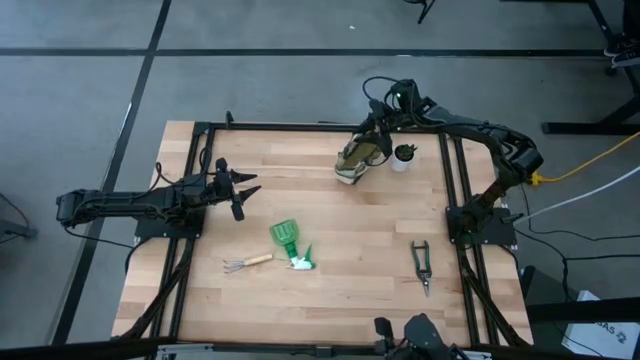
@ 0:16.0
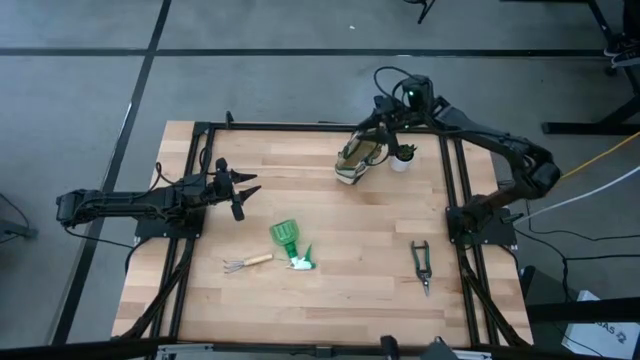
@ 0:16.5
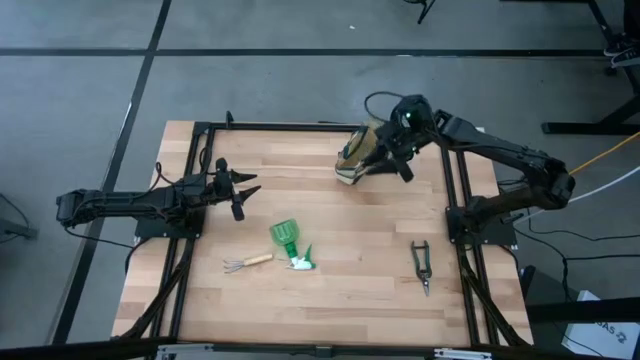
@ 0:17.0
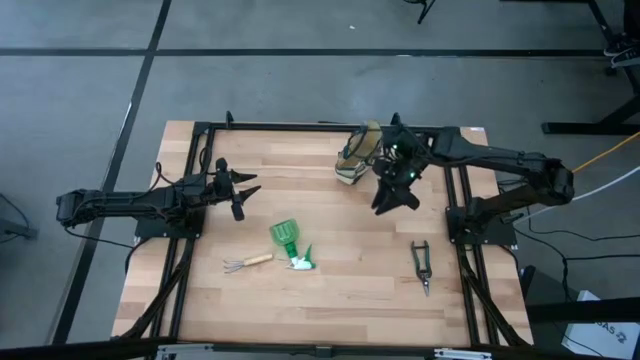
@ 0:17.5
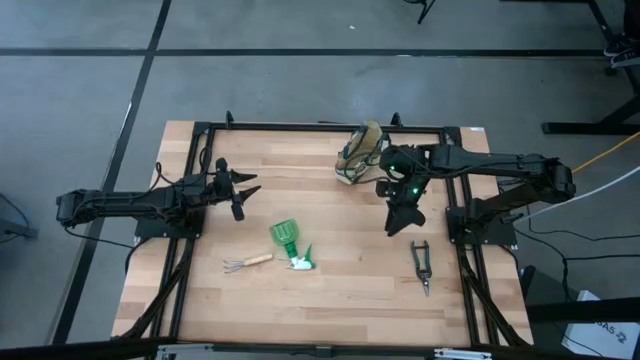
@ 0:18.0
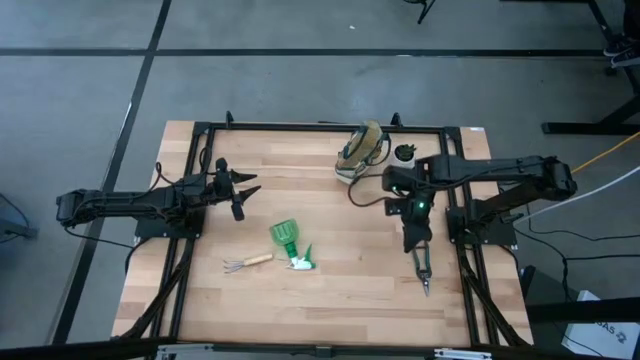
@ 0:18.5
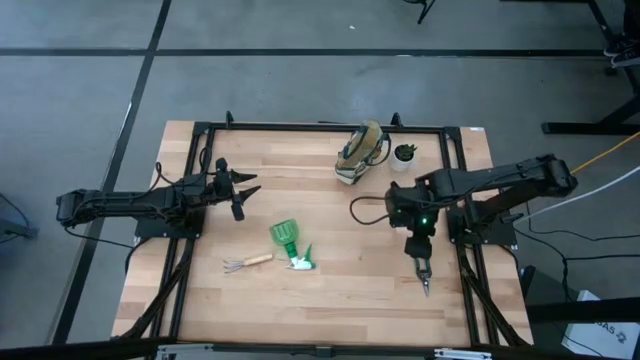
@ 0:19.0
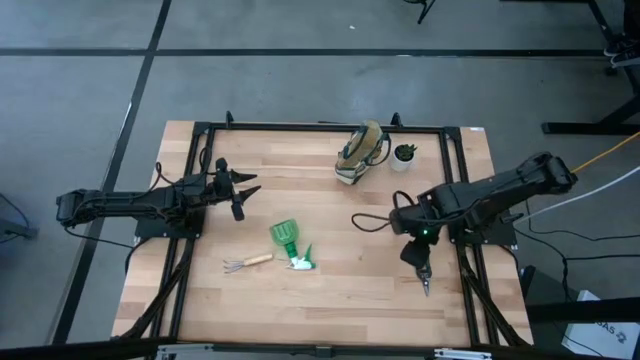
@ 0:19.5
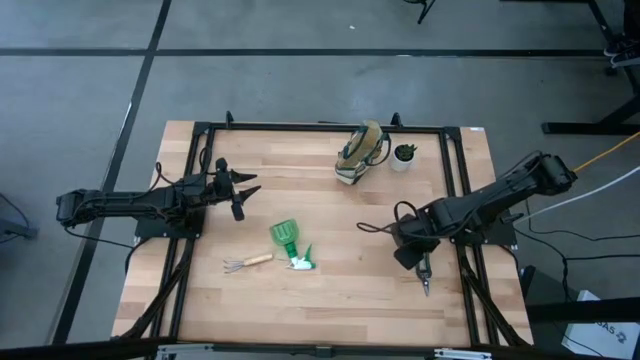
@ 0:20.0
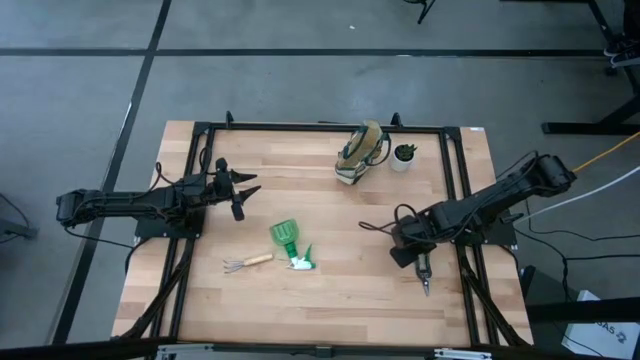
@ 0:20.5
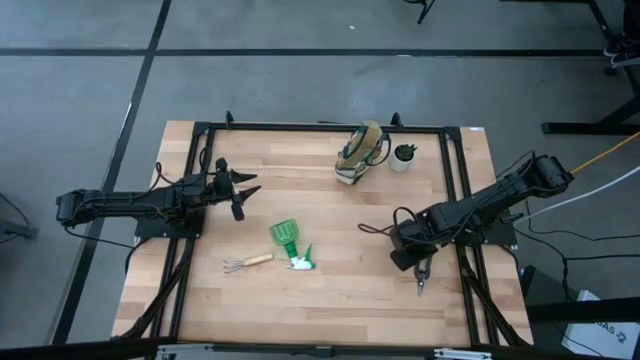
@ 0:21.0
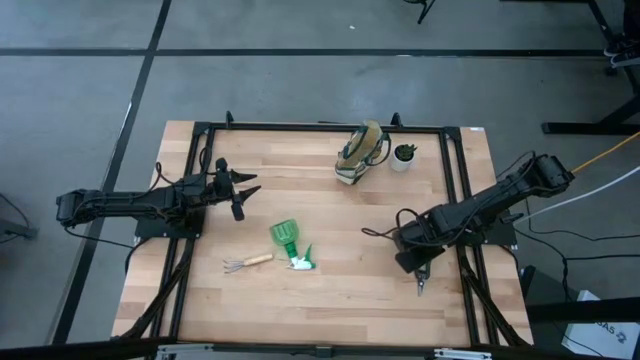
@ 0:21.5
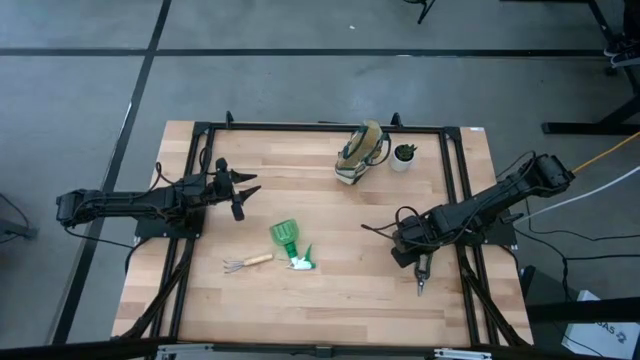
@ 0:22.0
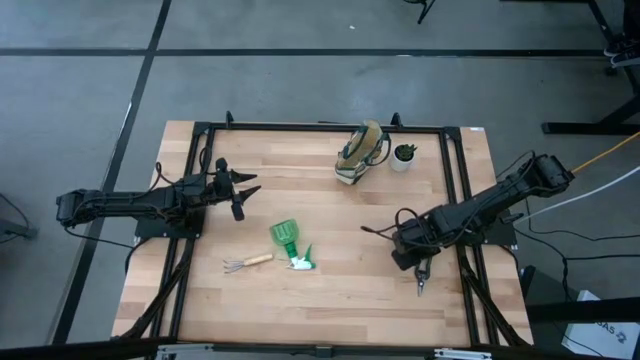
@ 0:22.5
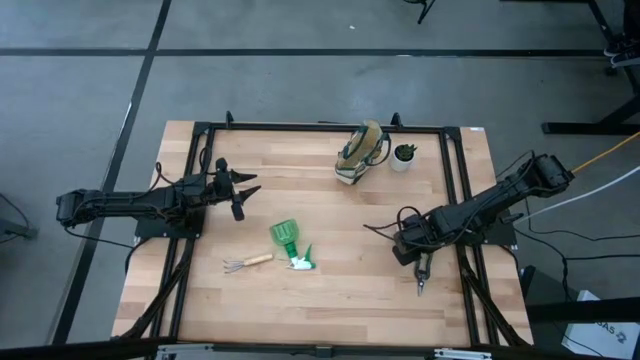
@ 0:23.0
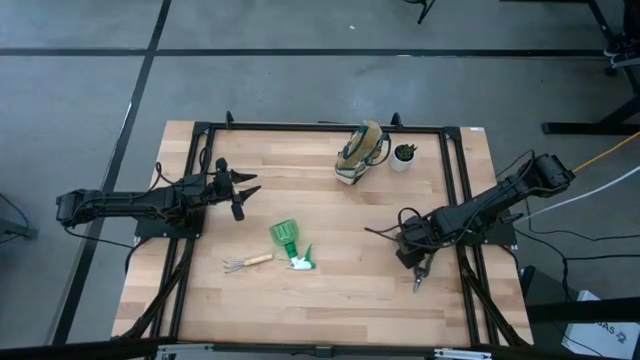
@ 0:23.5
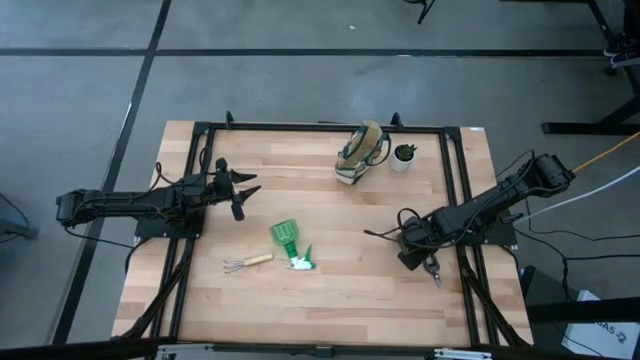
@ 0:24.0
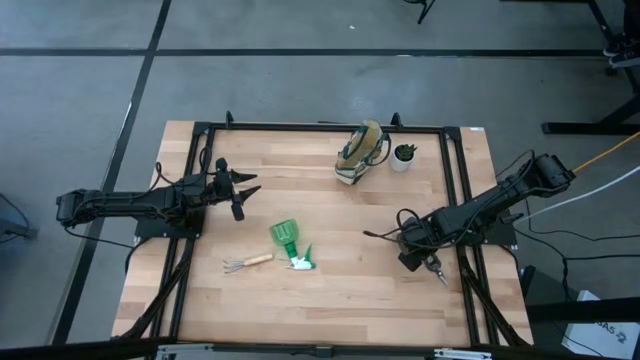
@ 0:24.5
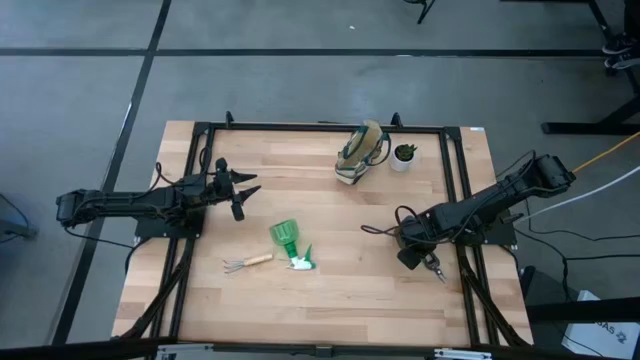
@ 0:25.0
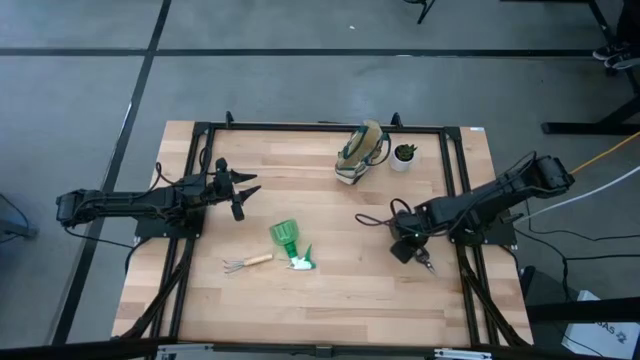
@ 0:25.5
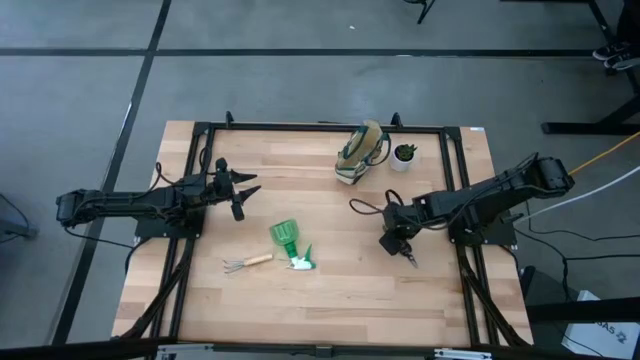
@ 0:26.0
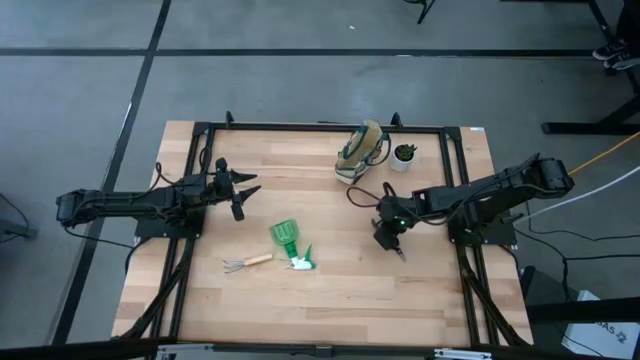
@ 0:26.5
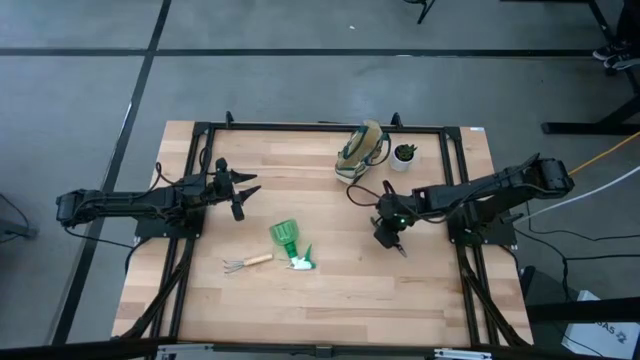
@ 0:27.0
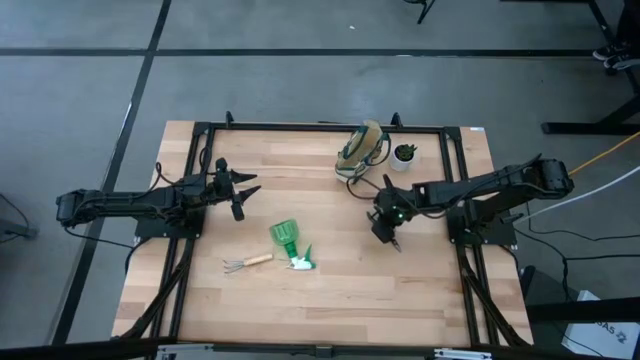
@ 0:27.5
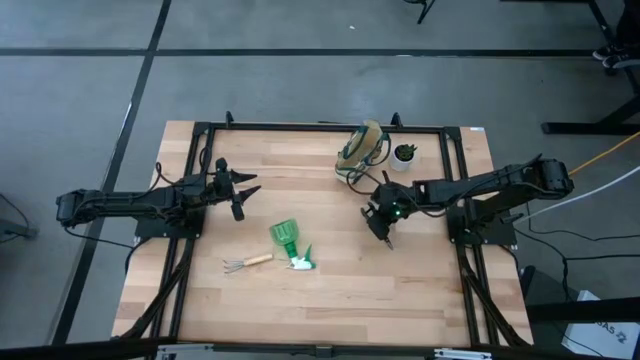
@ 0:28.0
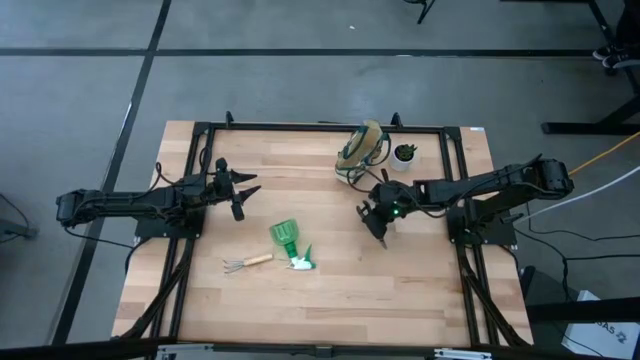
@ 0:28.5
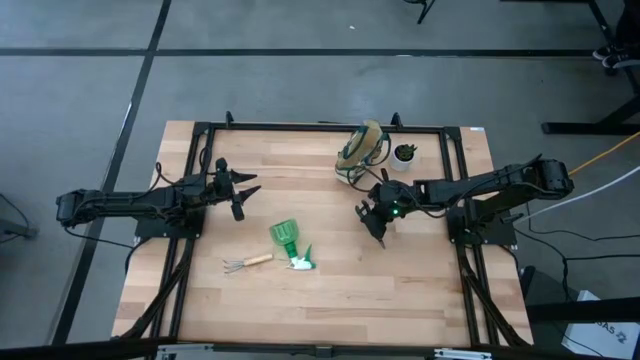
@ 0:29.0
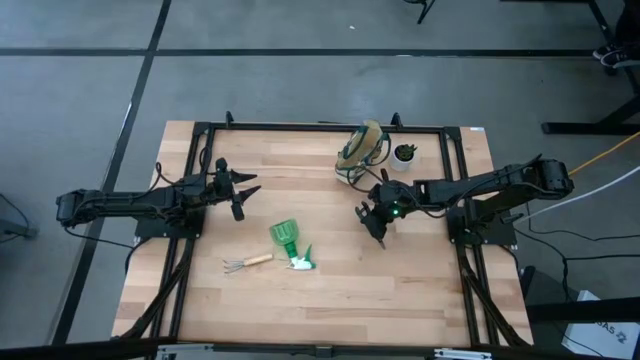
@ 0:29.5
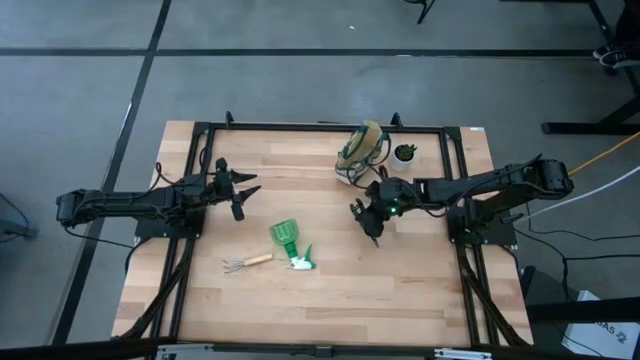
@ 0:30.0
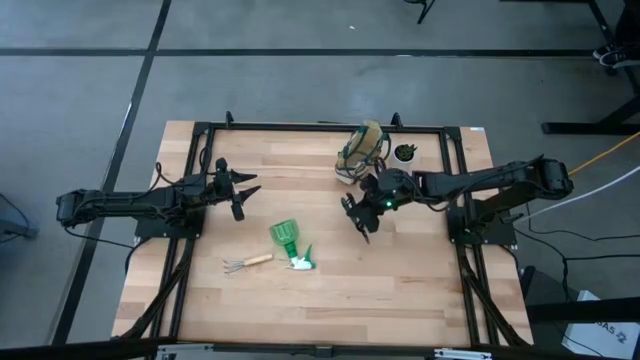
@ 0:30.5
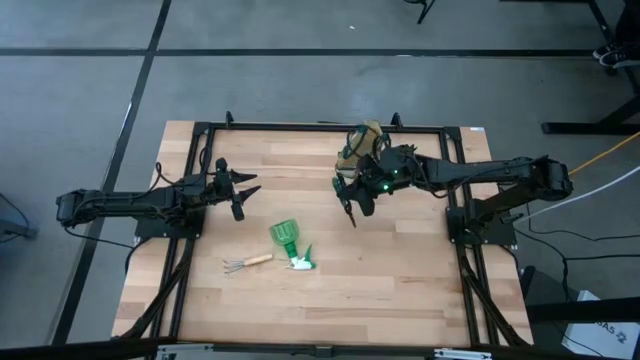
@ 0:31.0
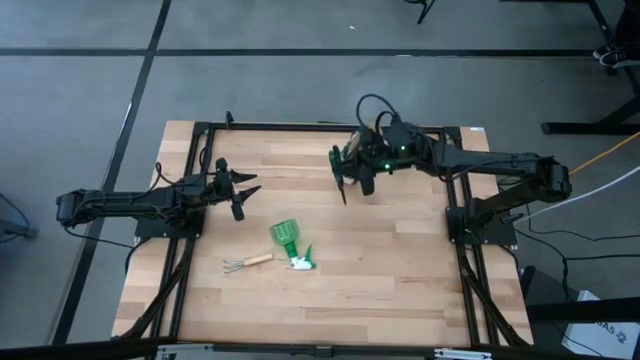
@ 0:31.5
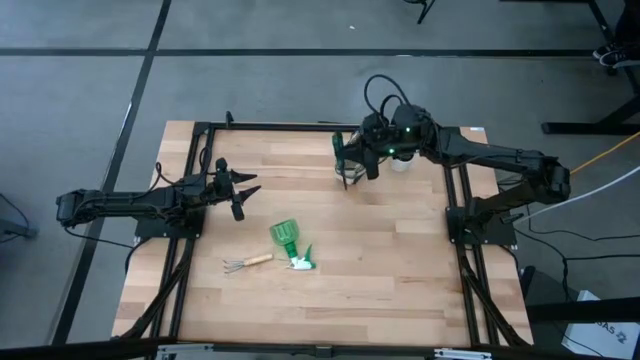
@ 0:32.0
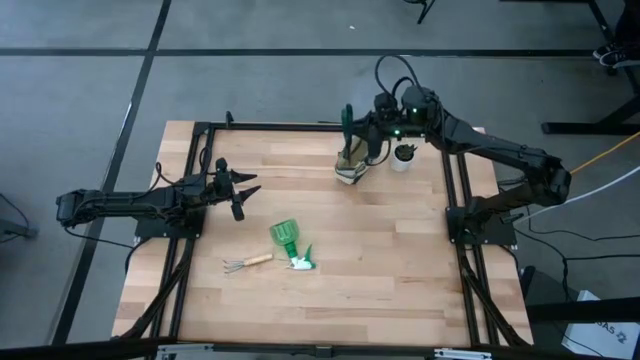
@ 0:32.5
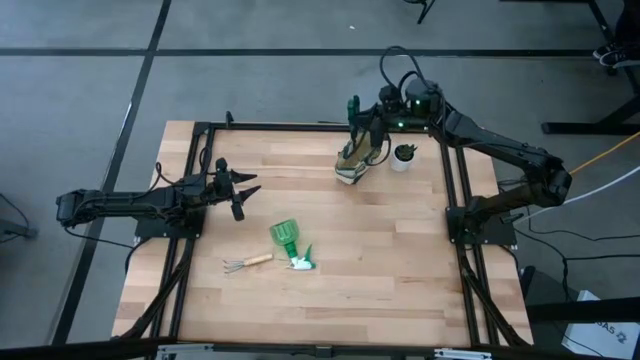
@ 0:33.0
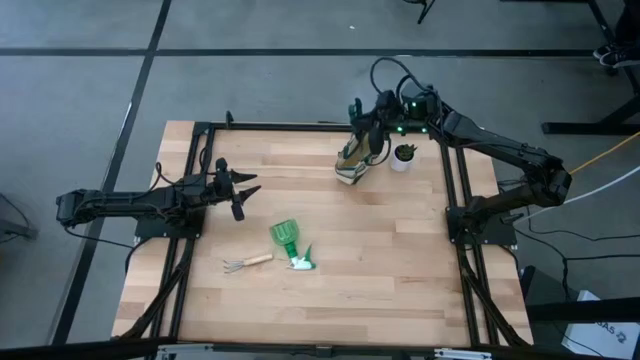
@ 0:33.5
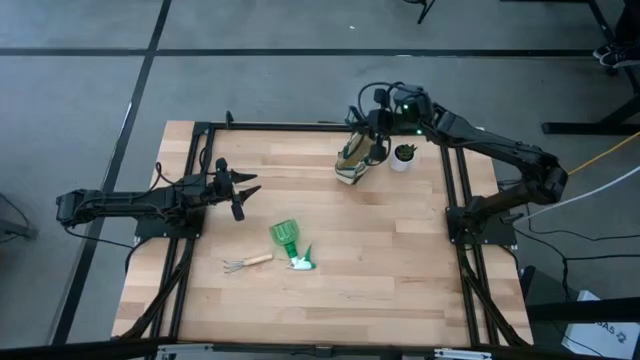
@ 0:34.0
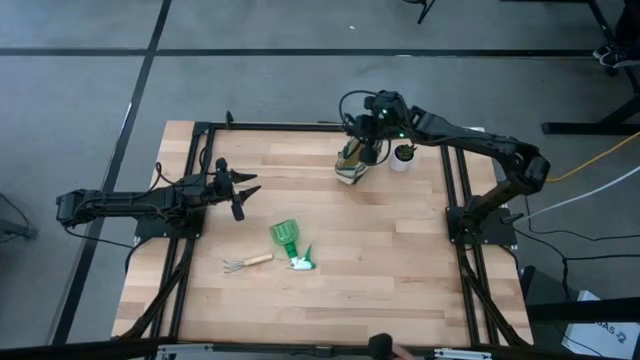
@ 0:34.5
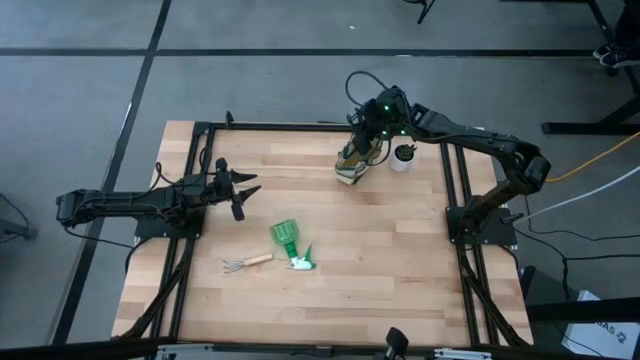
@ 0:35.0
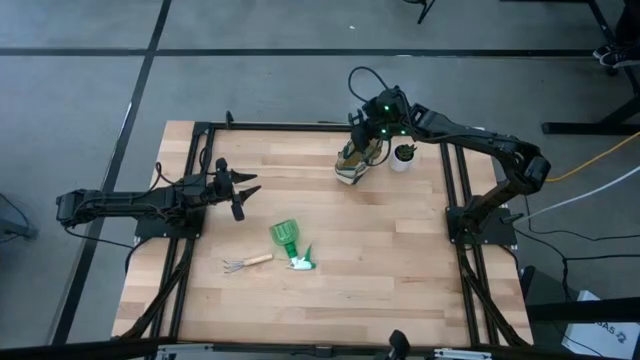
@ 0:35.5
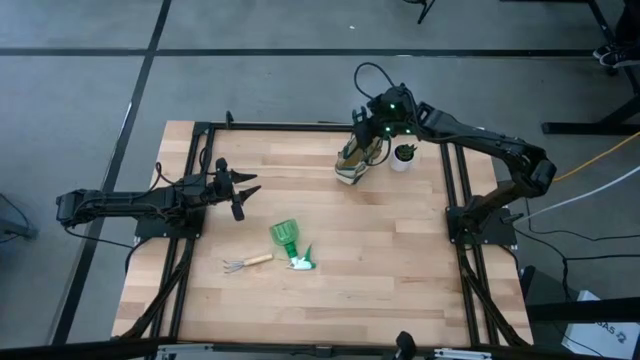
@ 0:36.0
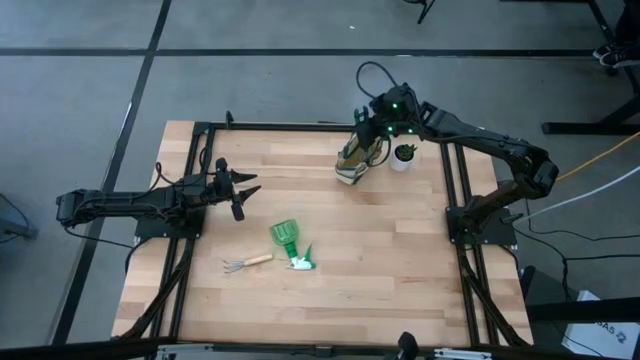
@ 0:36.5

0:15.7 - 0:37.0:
Task: Pick & Place Garden tools in Gardening bag
Put the green shear scissors into the brown gardening bag
